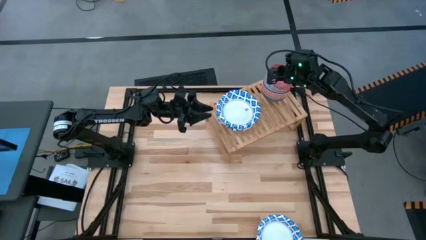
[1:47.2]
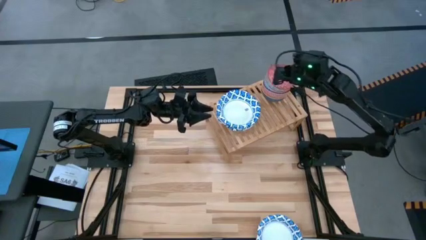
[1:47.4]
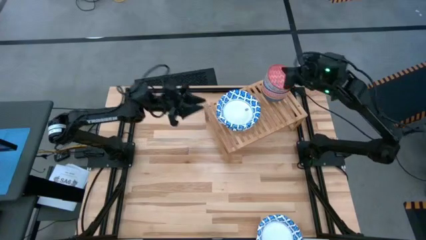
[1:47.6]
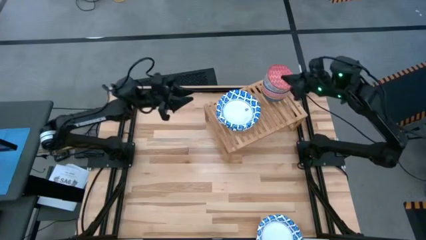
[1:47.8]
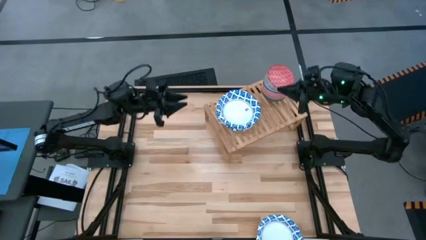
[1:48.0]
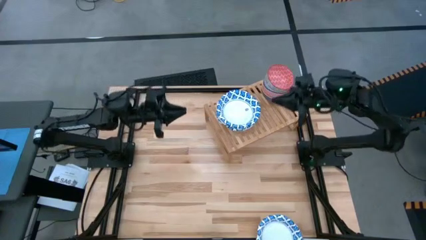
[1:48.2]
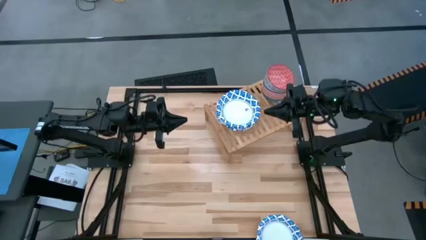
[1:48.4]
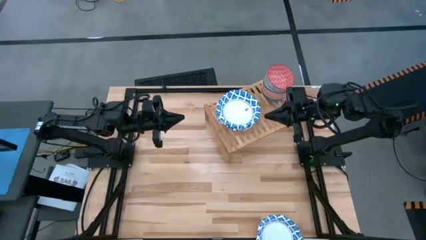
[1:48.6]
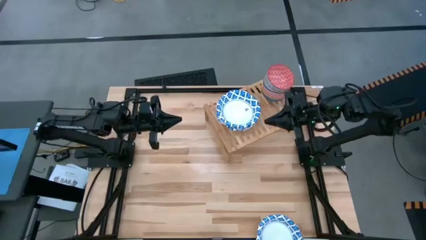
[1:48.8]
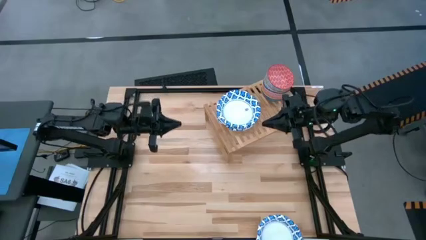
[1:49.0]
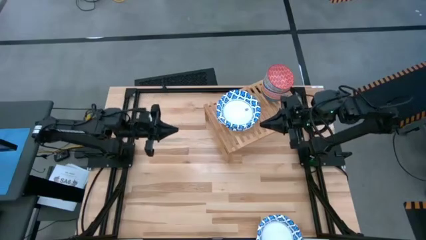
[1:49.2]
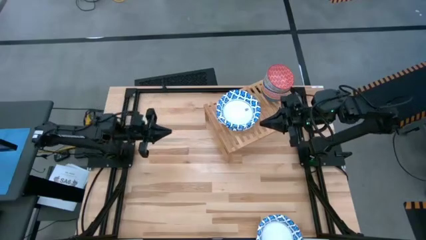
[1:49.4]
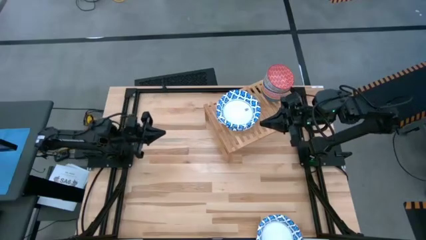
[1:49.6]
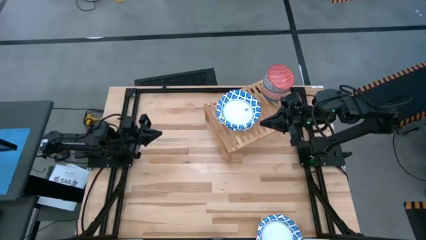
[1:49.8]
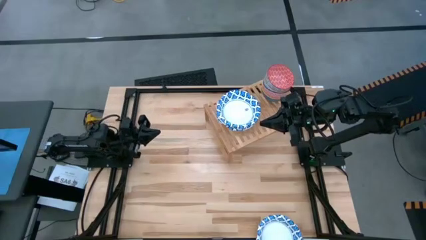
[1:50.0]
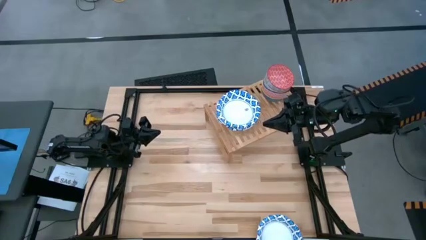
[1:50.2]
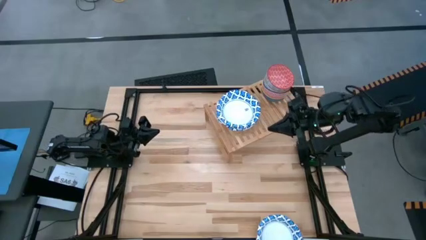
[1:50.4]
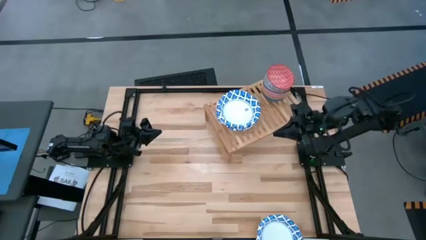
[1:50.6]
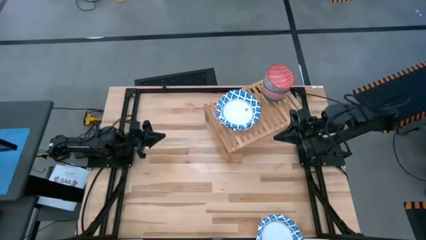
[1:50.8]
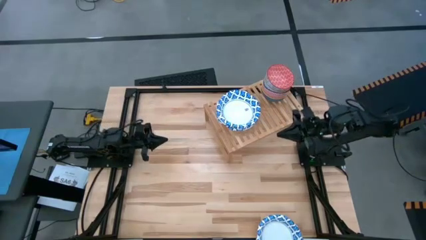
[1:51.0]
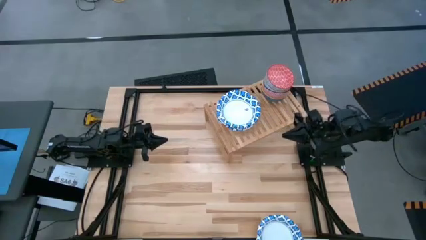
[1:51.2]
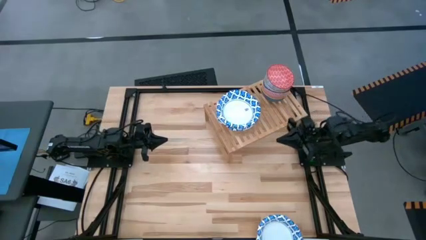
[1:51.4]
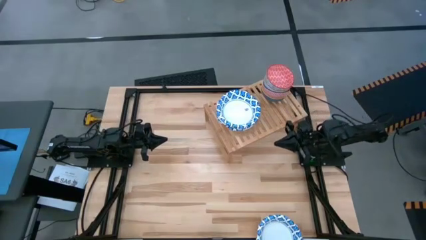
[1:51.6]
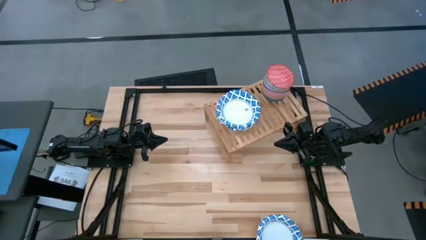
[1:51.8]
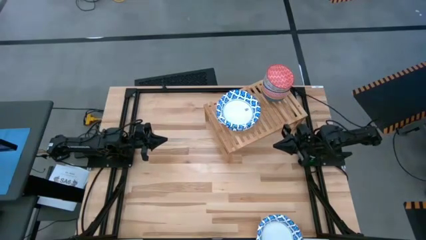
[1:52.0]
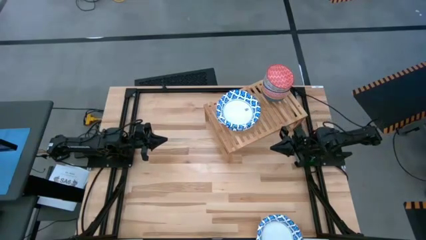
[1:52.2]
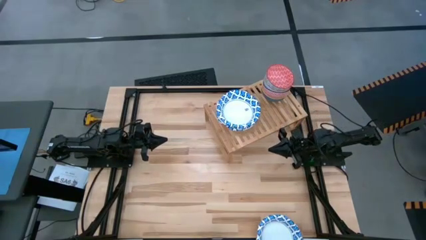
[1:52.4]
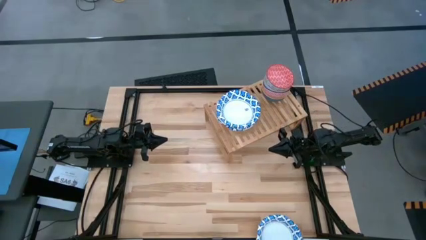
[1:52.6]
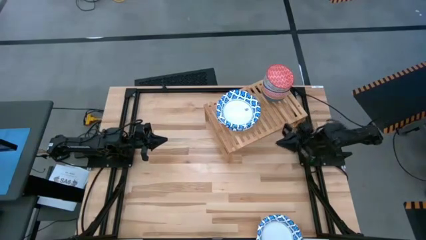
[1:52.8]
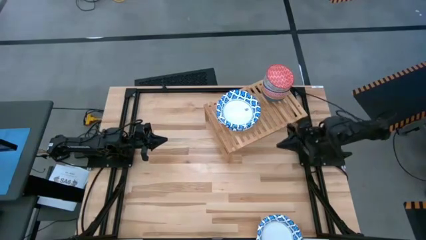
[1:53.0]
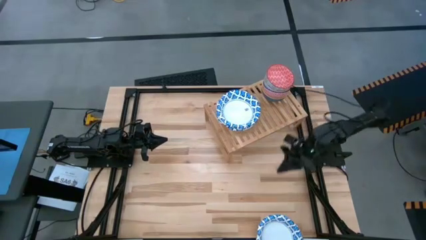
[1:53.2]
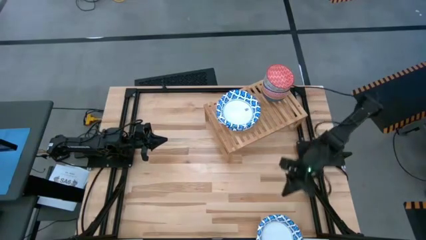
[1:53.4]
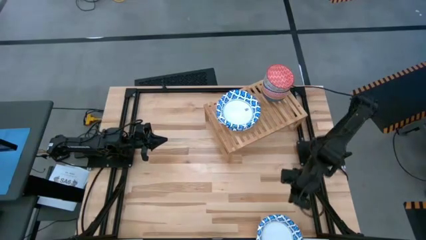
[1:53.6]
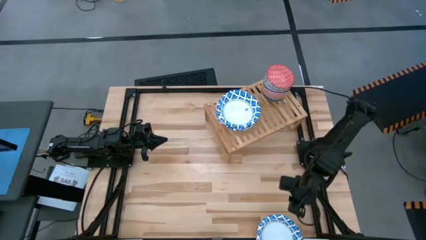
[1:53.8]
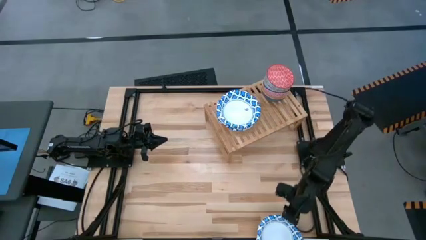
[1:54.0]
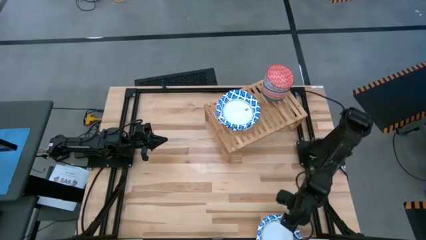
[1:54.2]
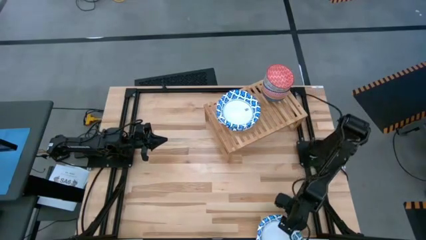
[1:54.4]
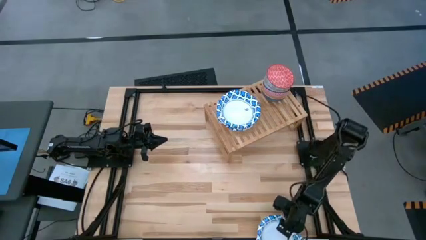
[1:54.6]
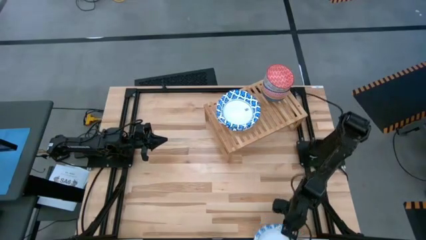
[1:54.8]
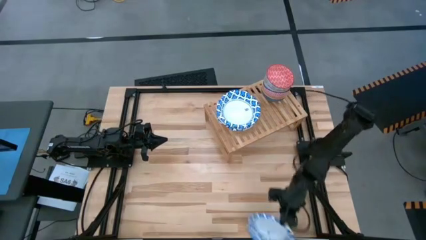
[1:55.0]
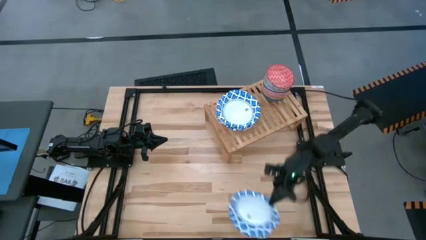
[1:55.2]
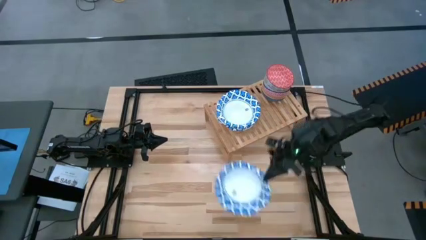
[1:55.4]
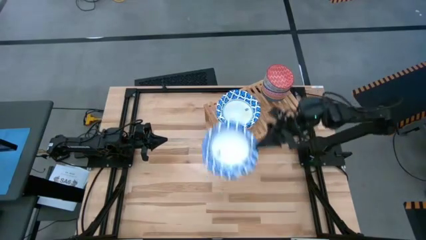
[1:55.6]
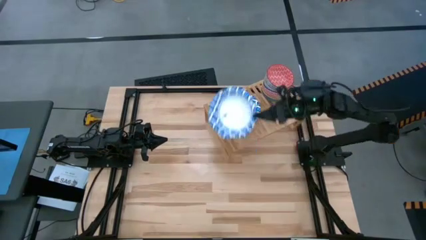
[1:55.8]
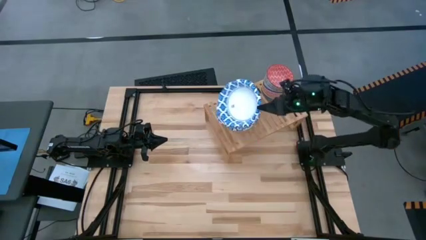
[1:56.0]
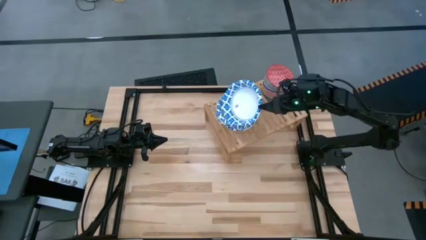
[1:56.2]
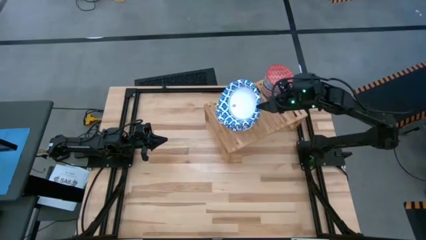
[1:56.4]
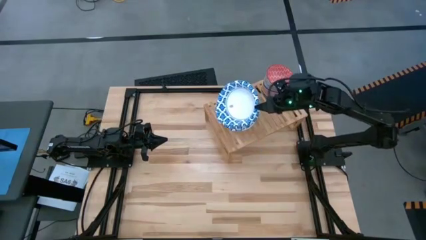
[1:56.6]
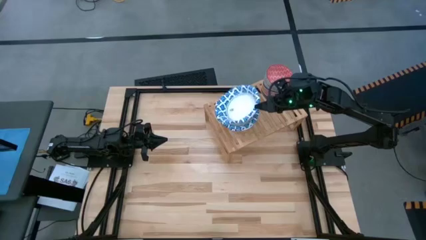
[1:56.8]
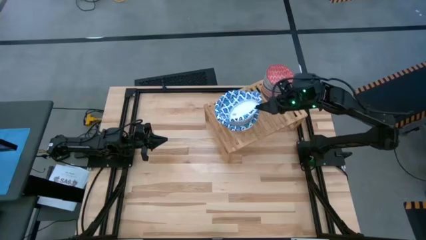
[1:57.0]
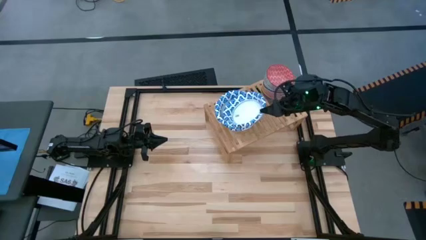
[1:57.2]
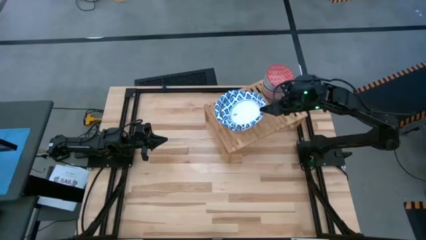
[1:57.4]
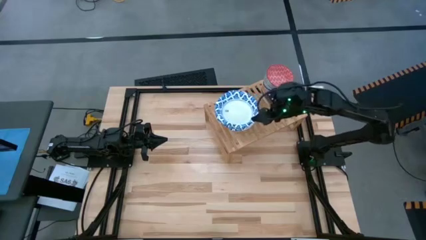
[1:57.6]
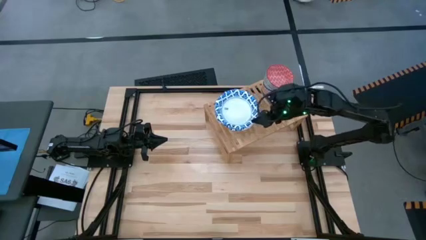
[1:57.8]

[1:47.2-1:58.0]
Task: Place and stack bowls onto a shelf
Stack the white pattern bowl on top of the white pattern bowl on the shelf

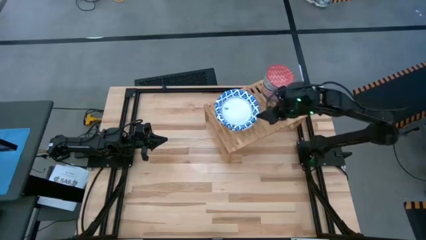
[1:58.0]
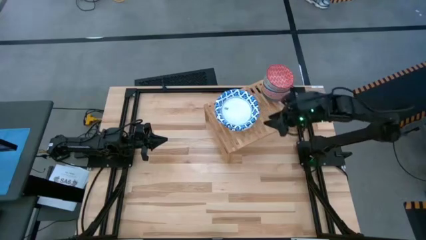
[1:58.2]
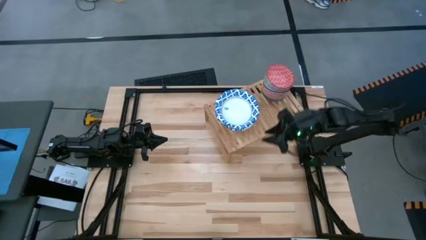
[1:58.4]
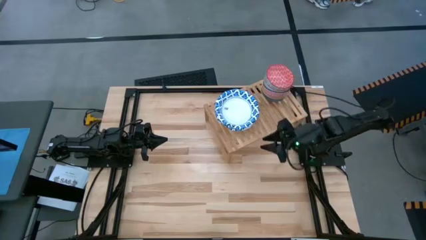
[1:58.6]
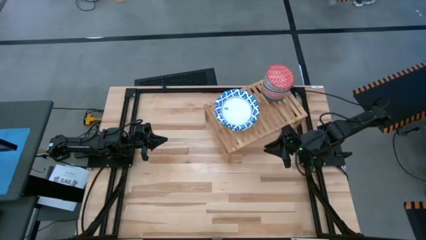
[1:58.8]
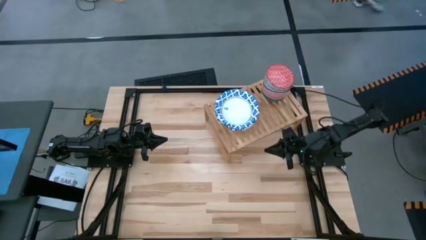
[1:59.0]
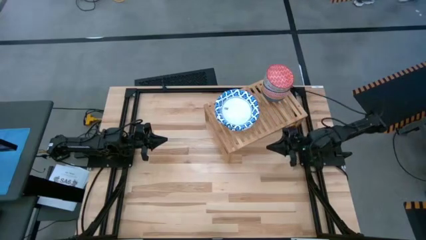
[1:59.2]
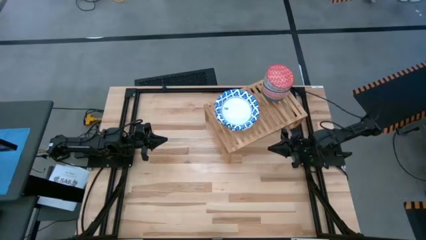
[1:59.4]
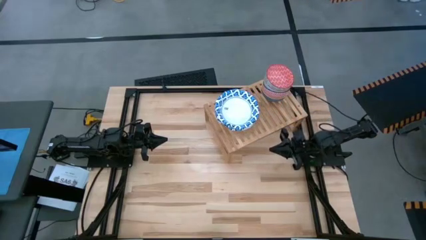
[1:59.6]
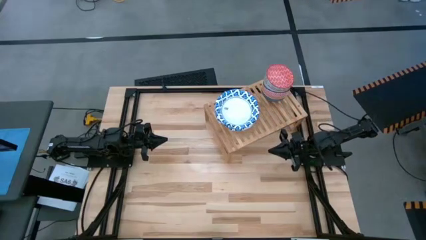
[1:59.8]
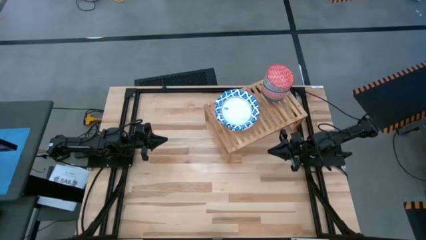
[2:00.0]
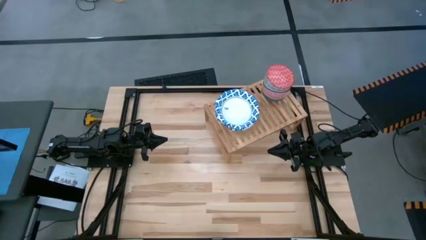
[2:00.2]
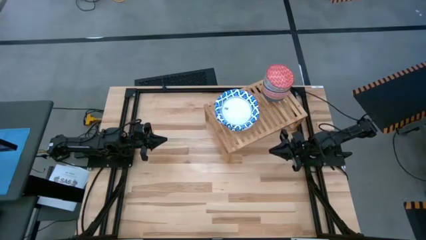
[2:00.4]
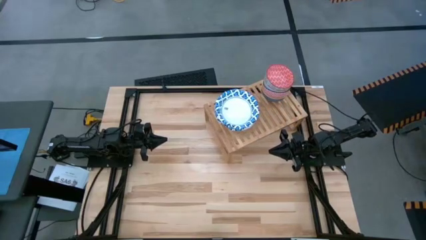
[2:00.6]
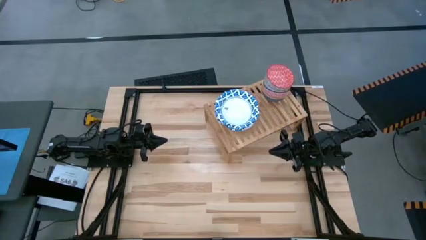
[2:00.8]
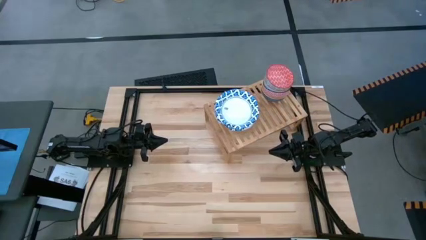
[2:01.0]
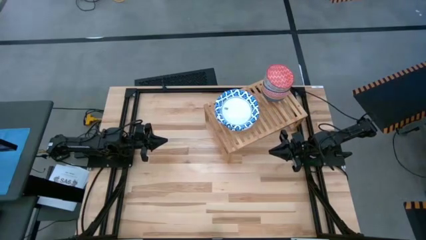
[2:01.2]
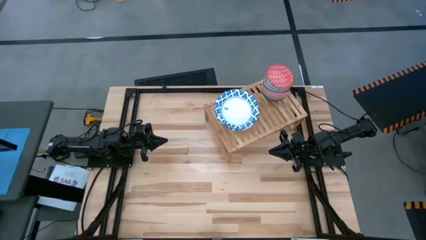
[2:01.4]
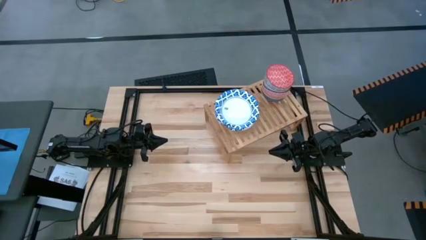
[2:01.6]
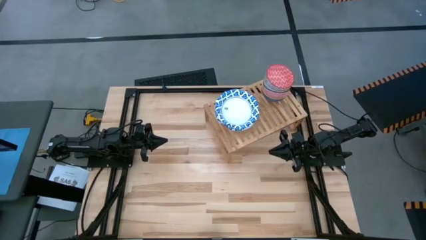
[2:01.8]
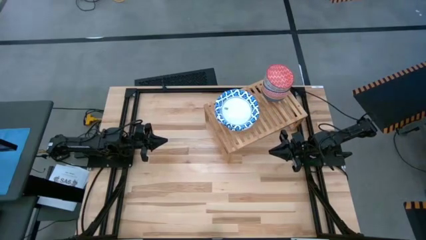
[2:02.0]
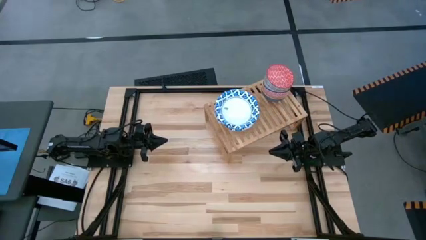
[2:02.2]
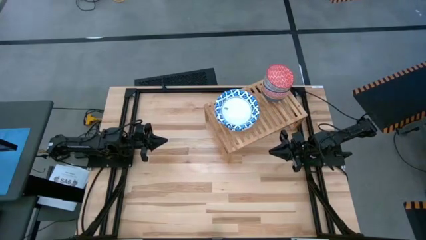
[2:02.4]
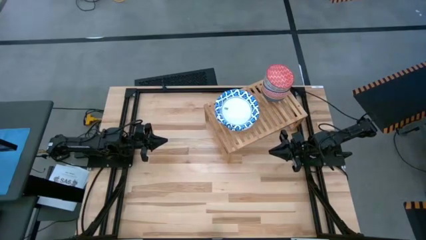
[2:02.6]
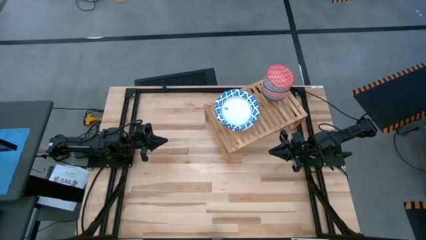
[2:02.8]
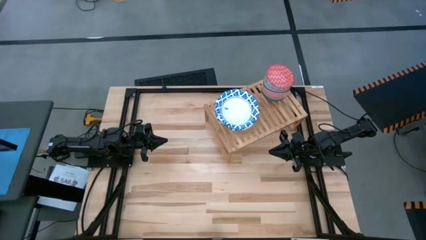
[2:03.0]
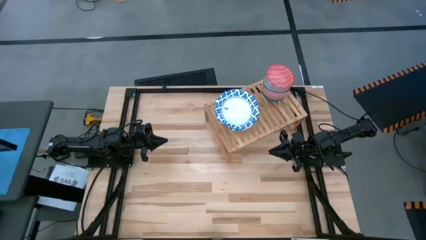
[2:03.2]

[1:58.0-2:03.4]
Return to Home Position
